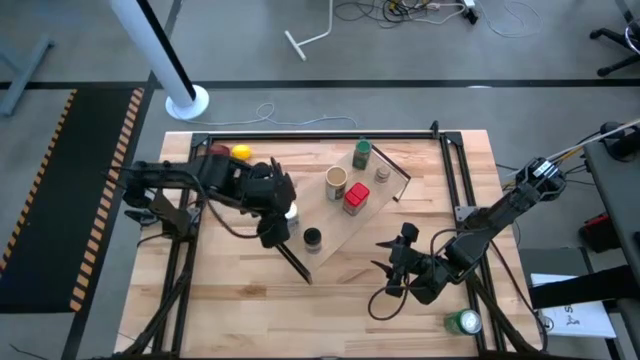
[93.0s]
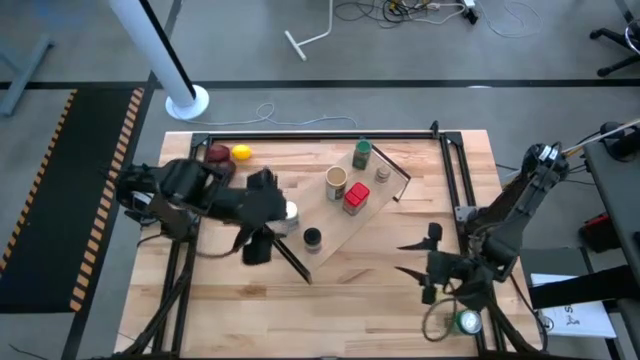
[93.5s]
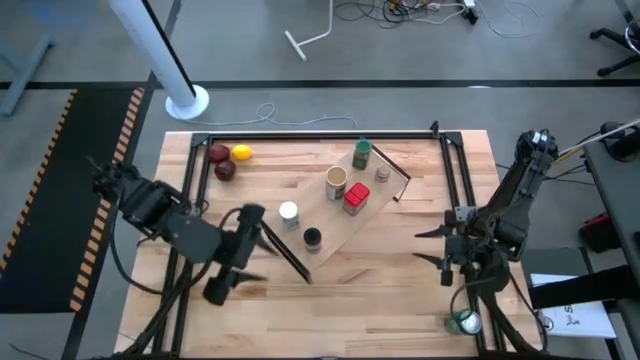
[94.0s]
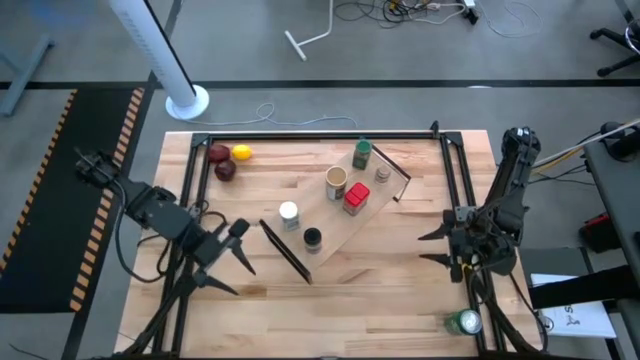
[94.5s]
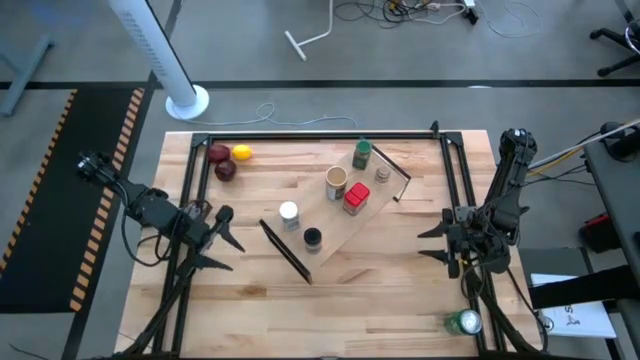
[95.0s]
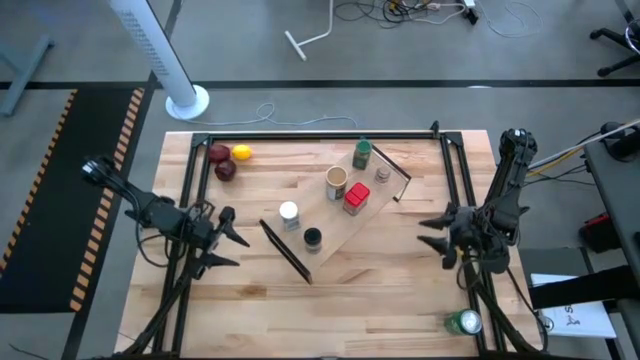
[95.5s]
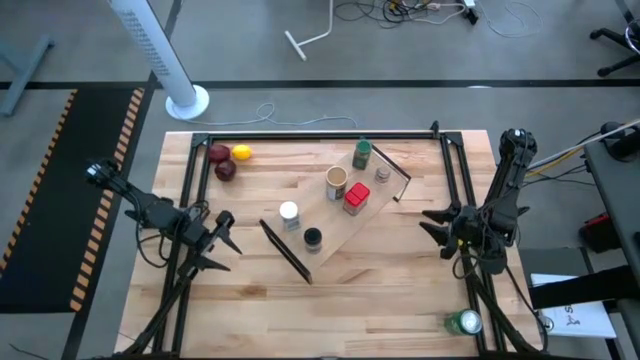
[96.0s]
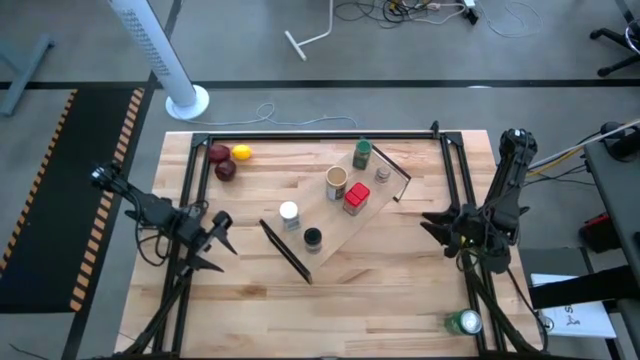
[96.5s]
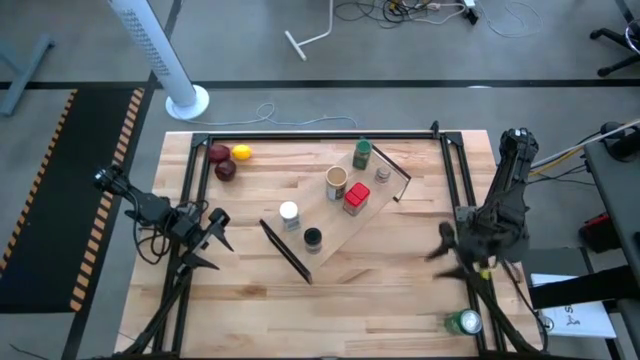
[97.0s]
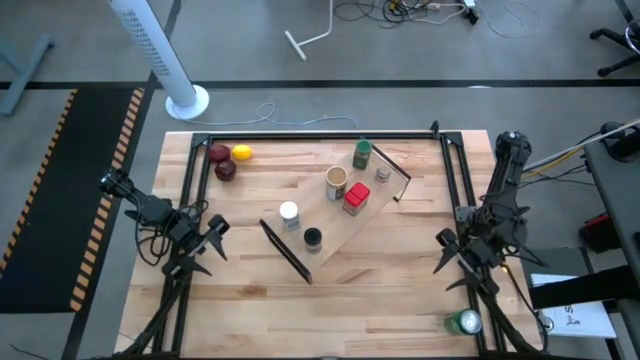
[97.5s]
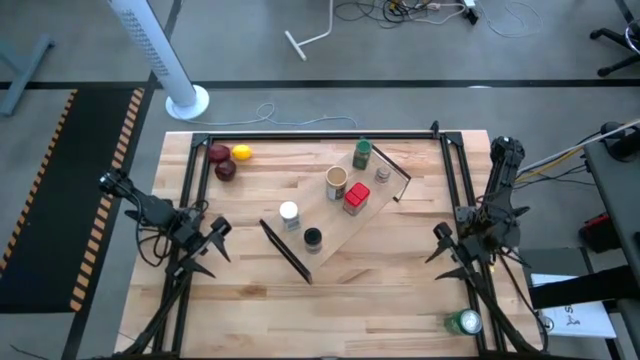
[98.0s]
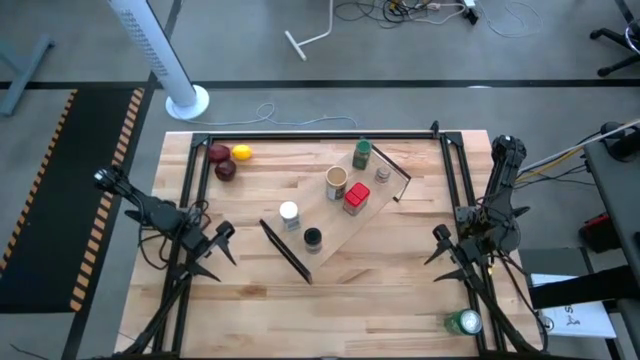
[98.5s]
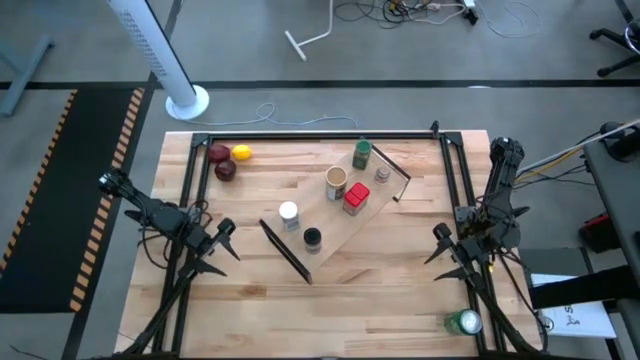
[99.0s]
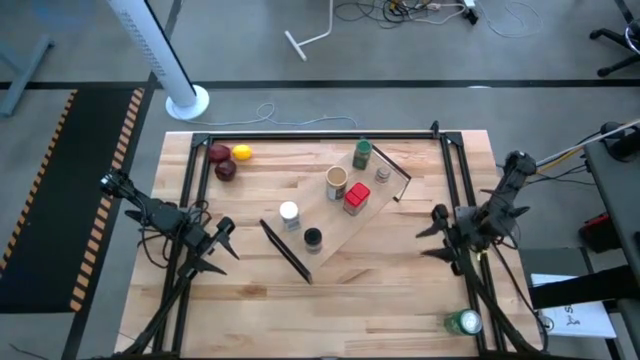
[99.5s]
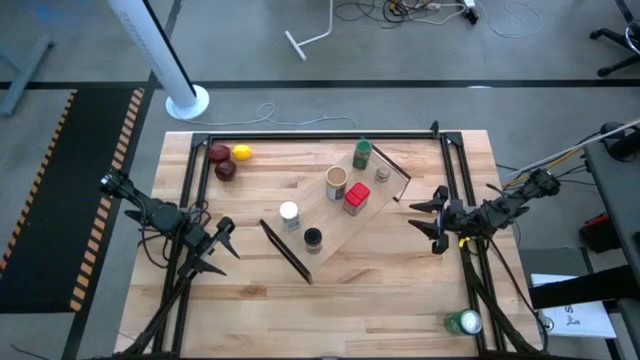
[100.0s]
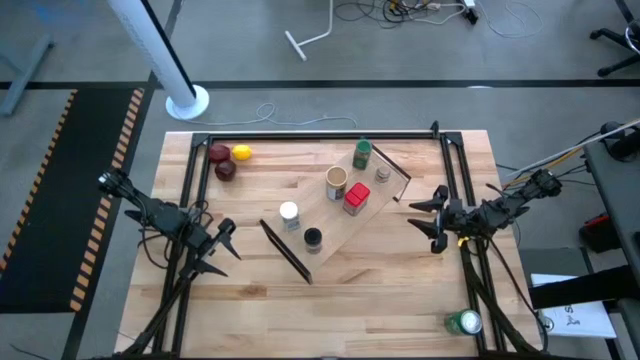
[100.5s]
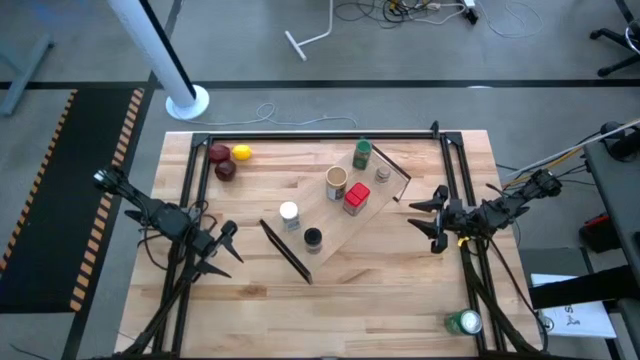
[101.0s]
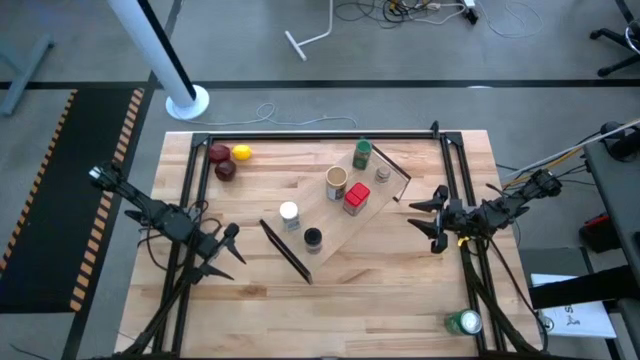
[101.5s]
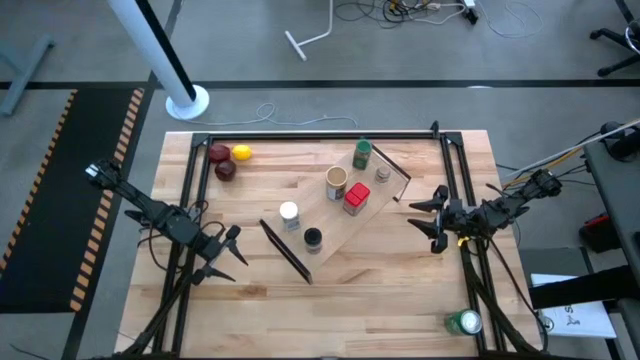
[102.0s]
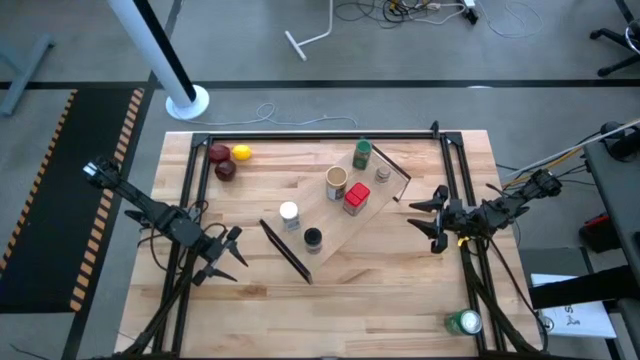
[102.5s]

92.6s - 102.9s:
Task: Shelf spices
Return to Home Position

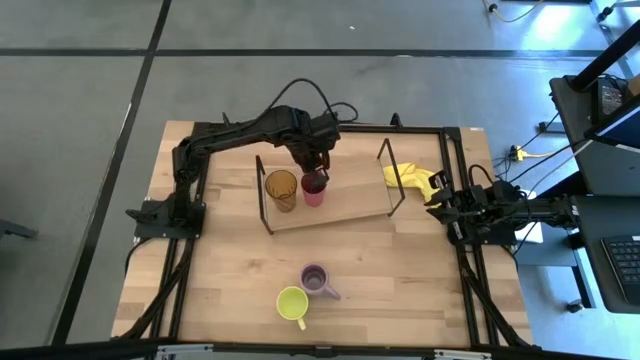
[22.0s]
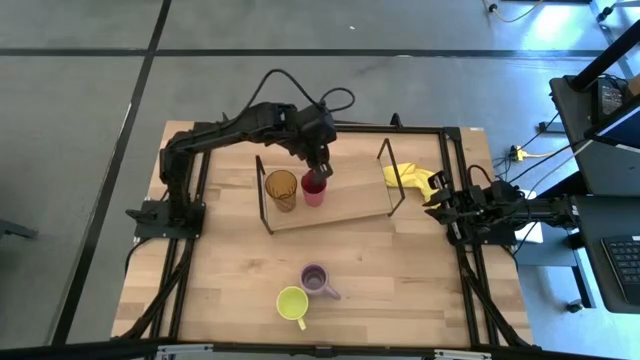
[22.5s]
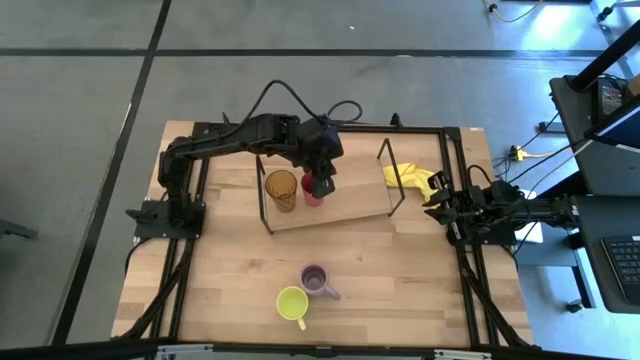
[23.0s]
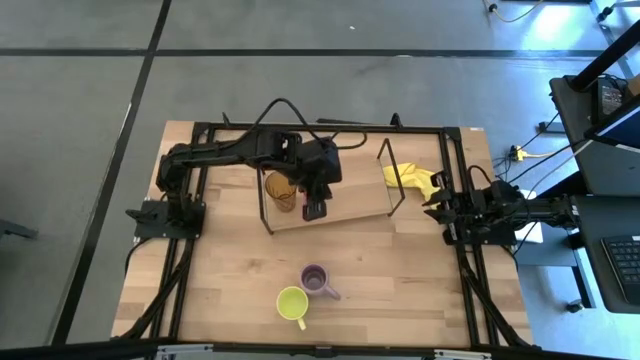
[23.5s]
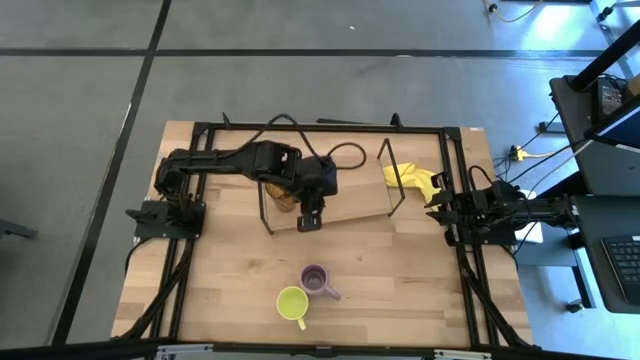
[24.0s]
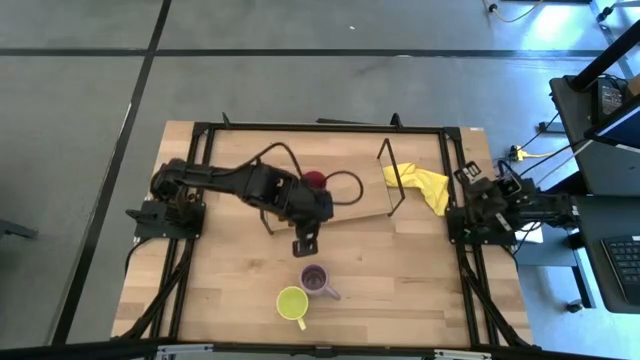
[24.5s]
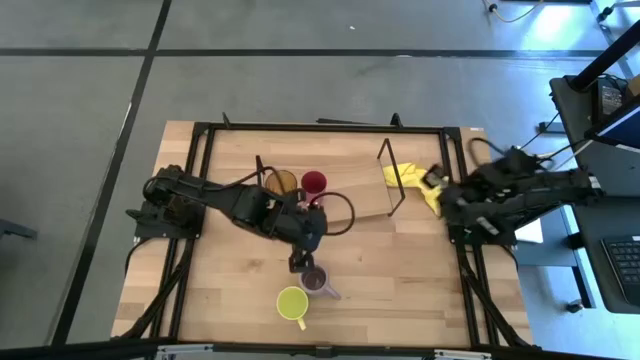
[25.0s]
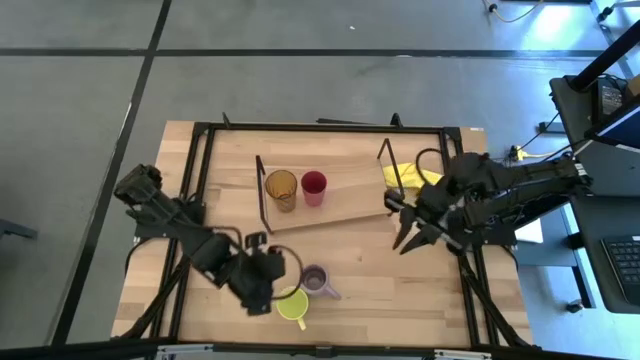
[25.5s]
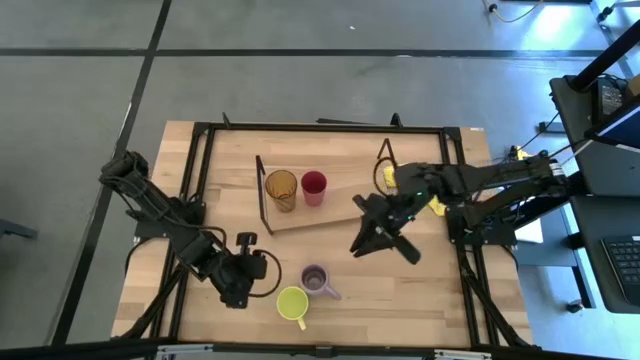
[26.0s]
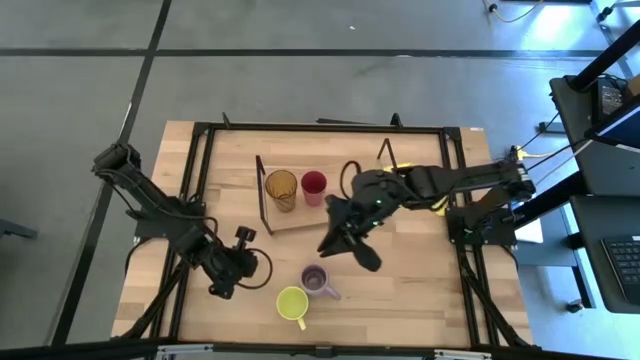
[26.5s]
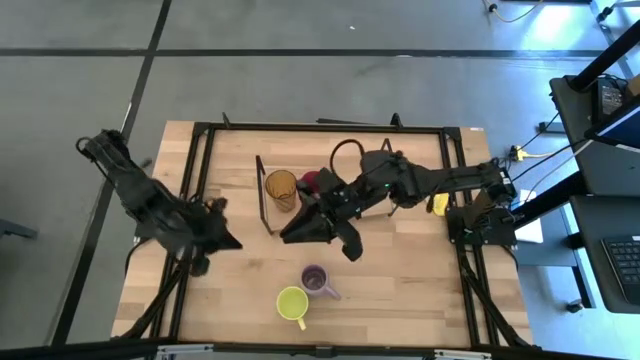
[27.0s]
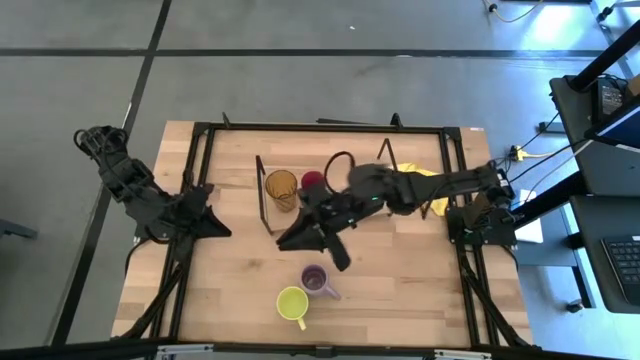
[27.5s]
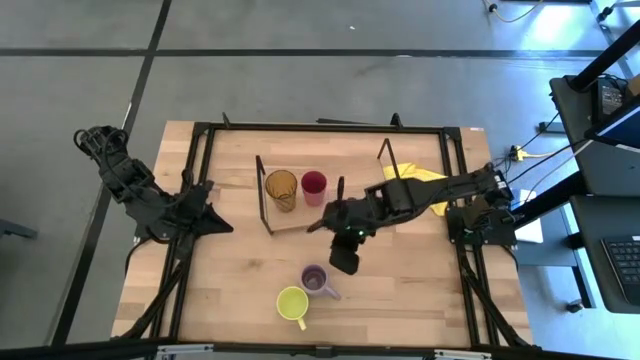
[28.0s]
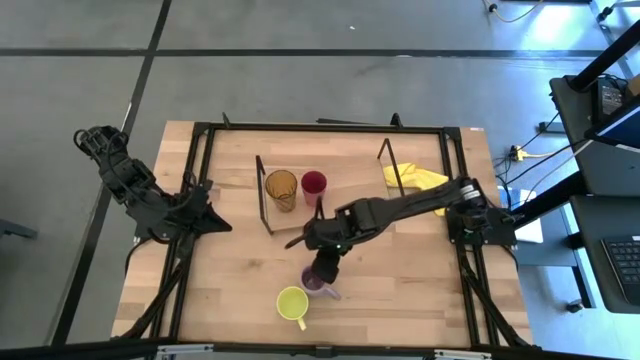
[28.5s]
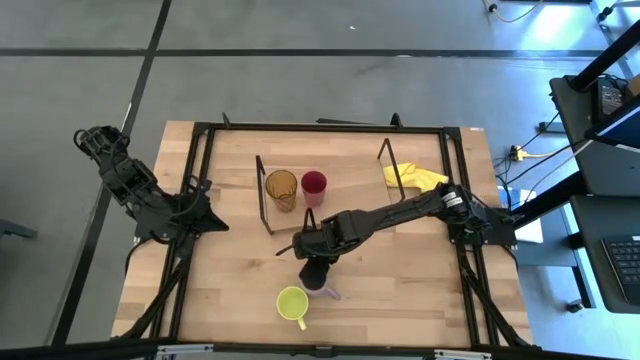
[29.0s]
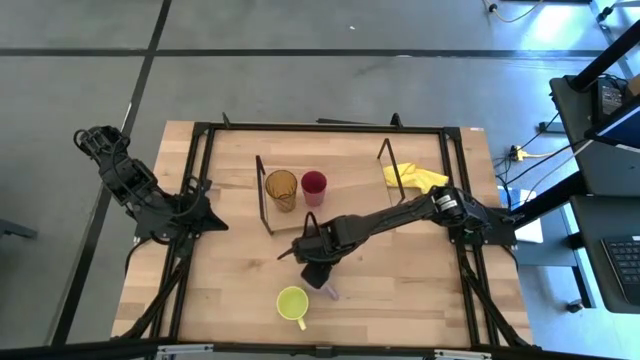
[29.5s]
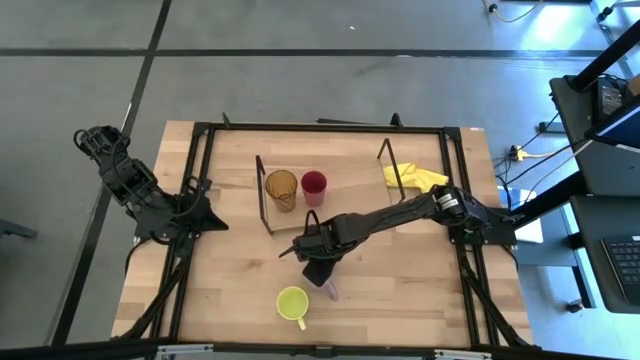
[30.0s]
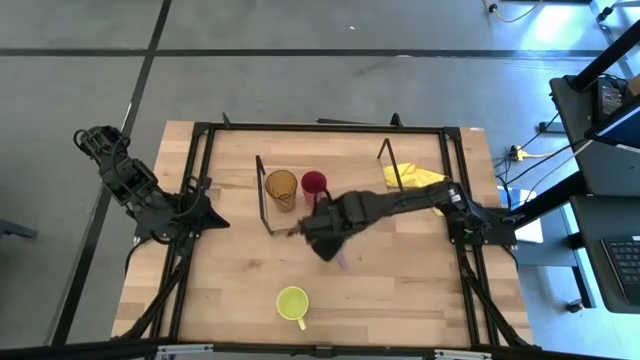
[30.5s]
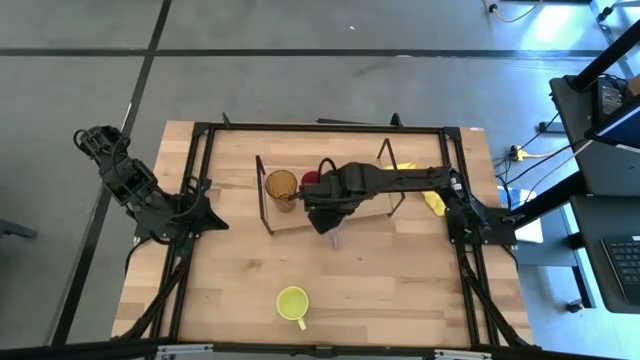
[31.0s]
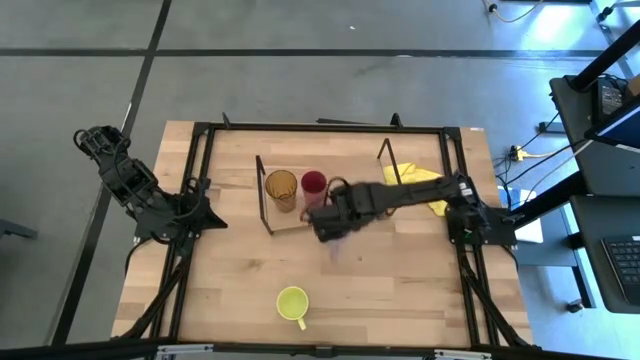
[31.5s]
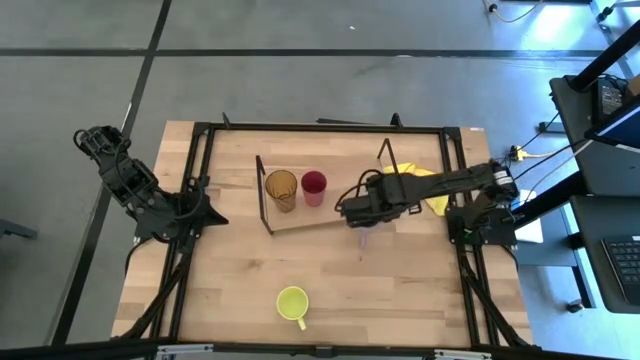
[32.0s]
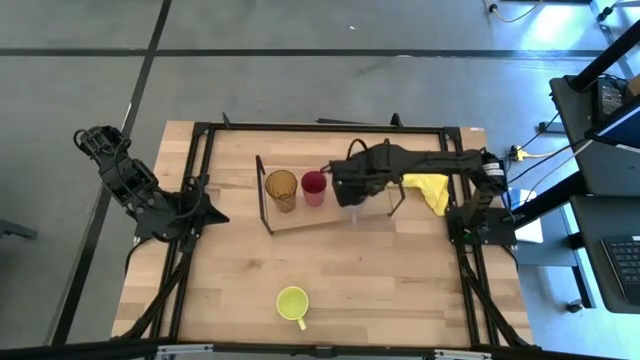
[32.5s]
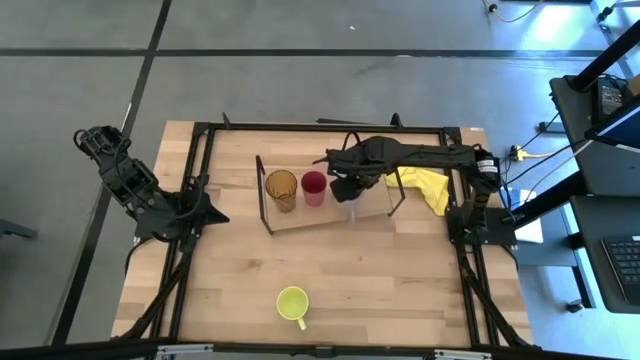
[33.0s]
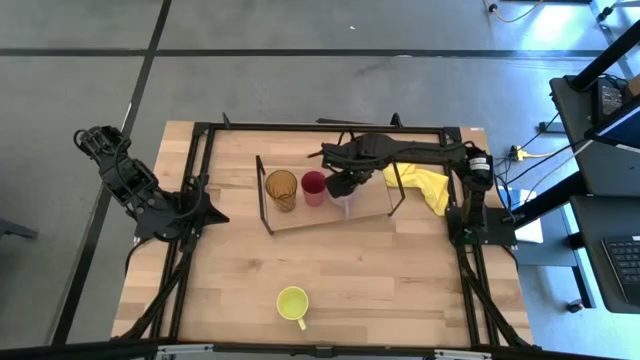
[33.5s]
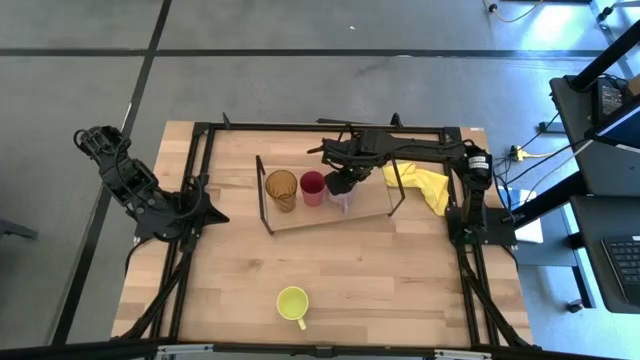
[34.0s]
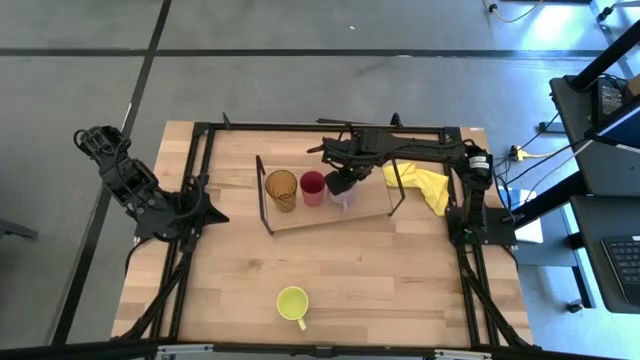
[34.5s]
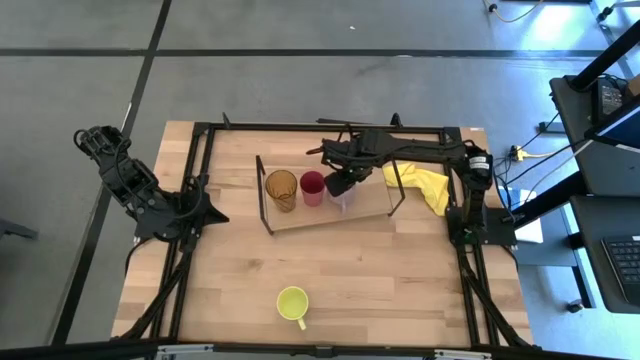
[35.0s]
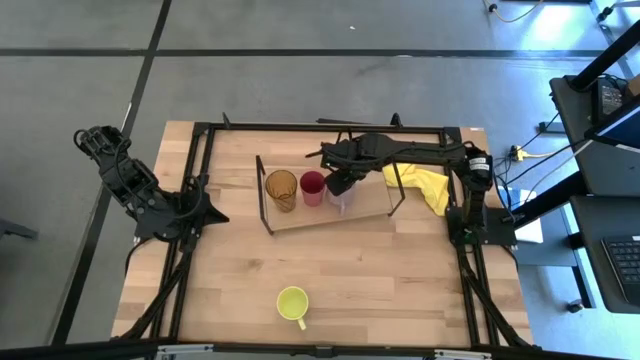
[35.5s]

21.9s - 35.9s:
Task: Stack small to large cups/mugs on shelf
Put the purple mug on the shelf
